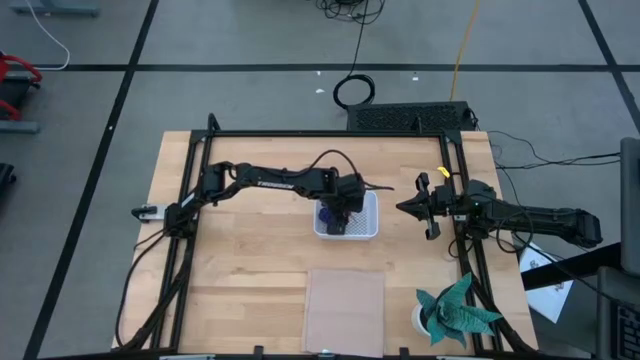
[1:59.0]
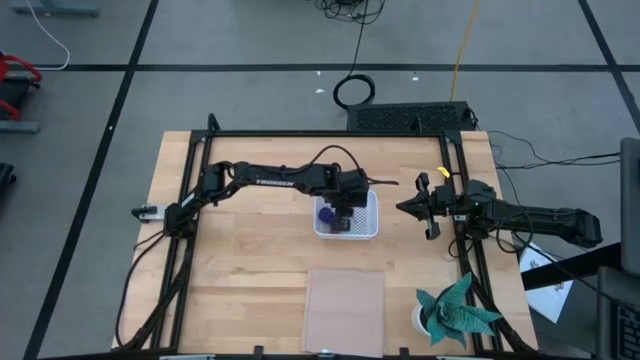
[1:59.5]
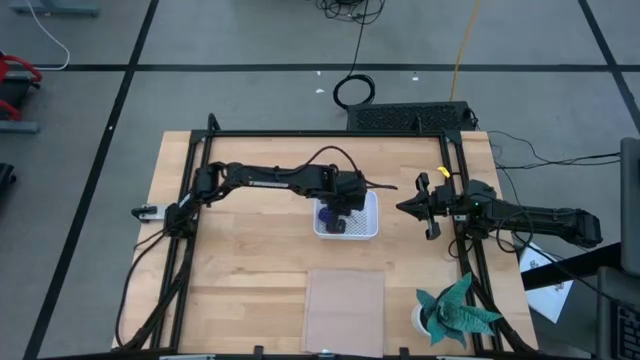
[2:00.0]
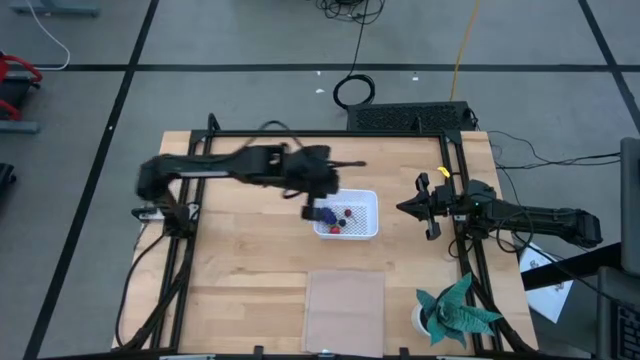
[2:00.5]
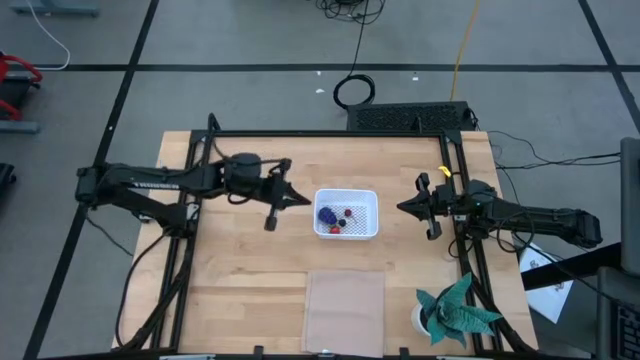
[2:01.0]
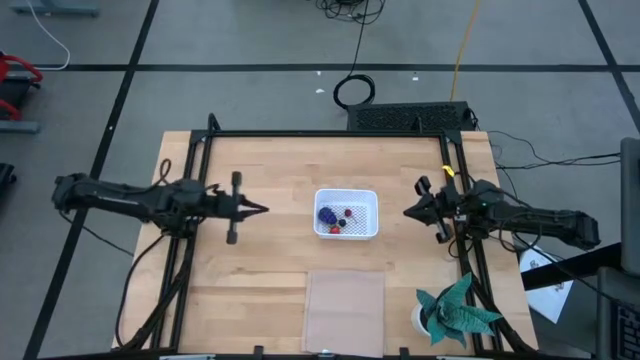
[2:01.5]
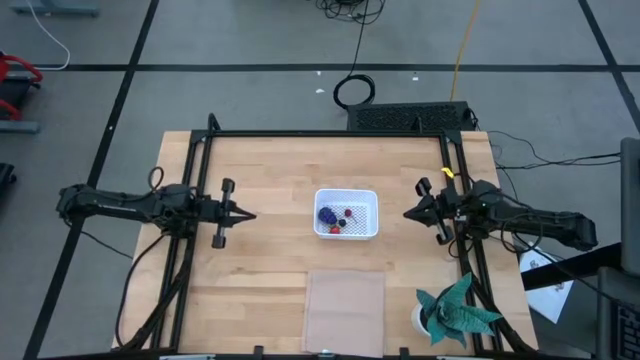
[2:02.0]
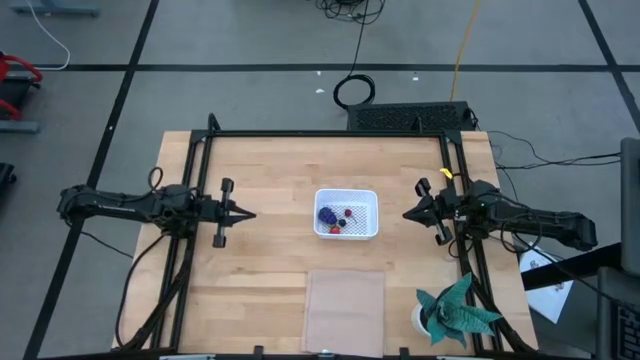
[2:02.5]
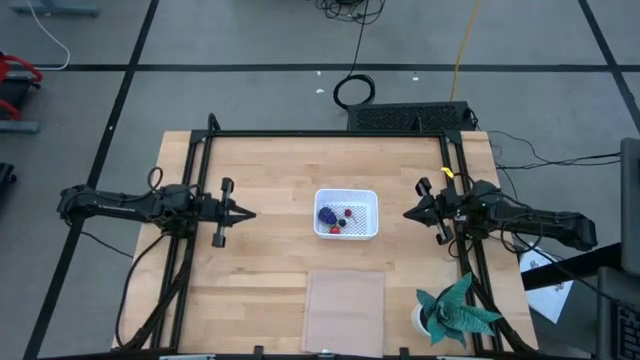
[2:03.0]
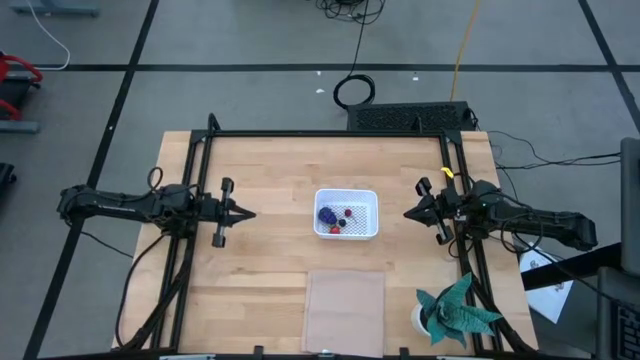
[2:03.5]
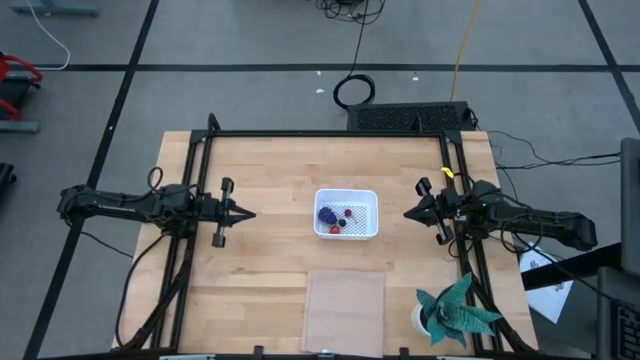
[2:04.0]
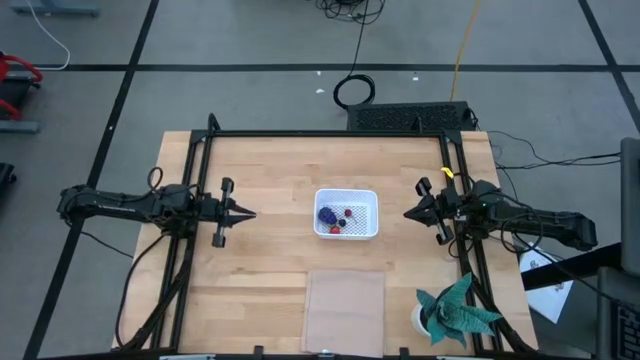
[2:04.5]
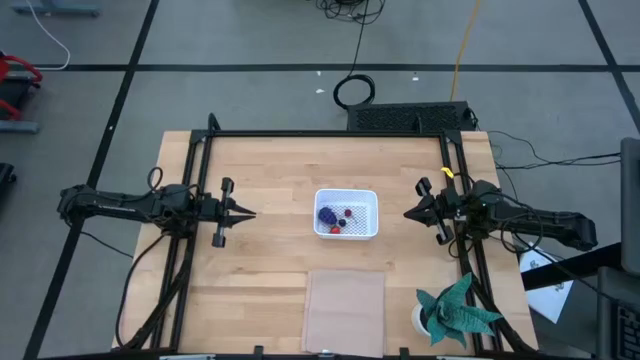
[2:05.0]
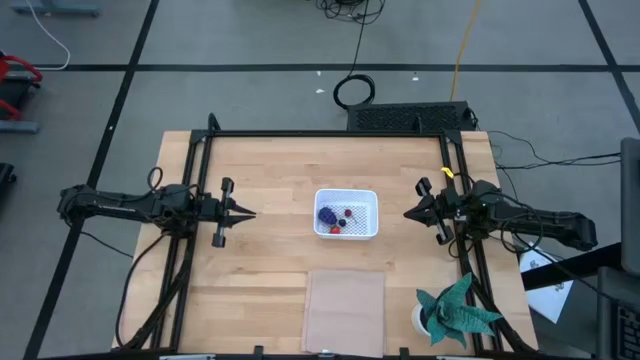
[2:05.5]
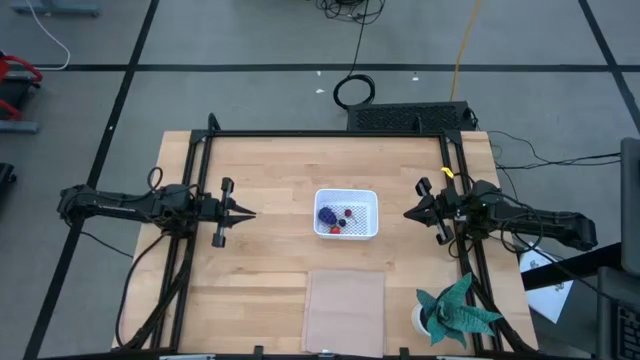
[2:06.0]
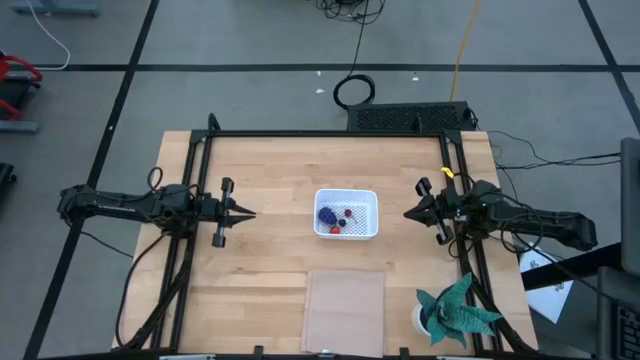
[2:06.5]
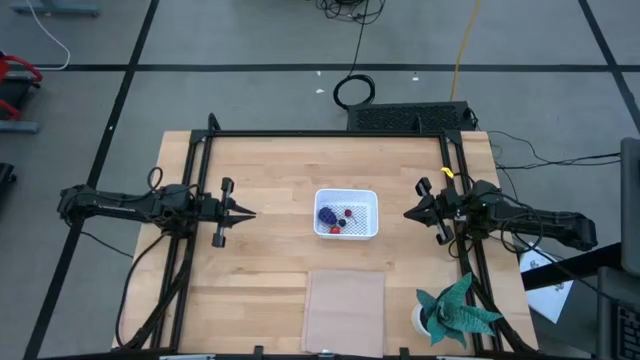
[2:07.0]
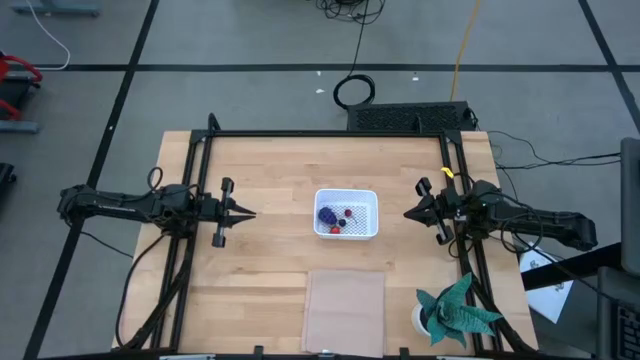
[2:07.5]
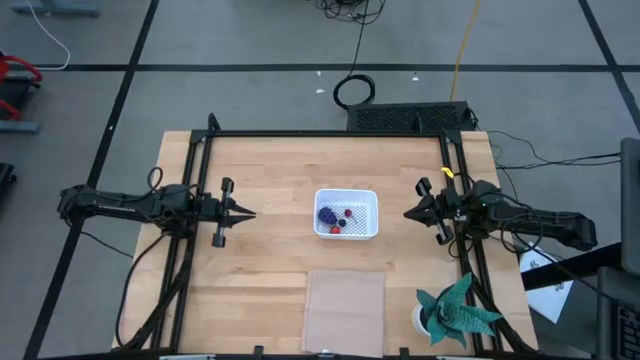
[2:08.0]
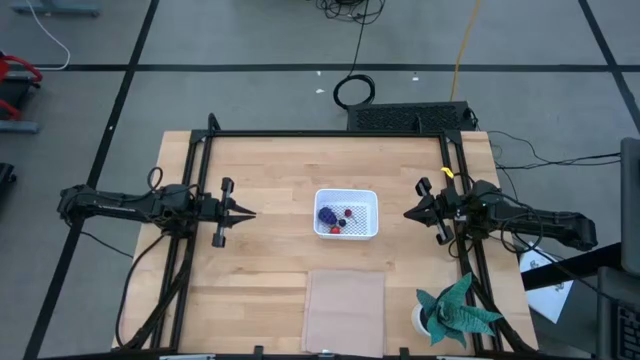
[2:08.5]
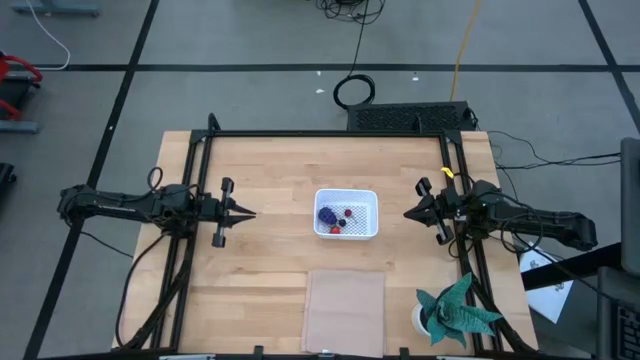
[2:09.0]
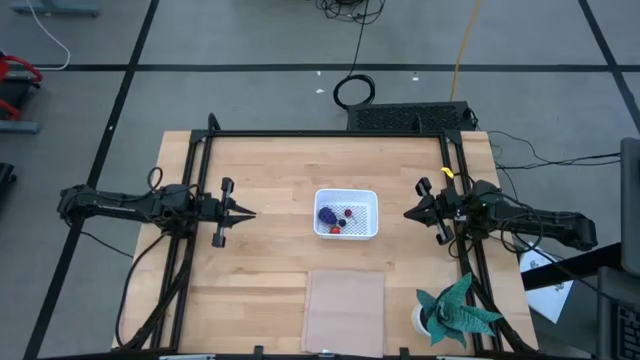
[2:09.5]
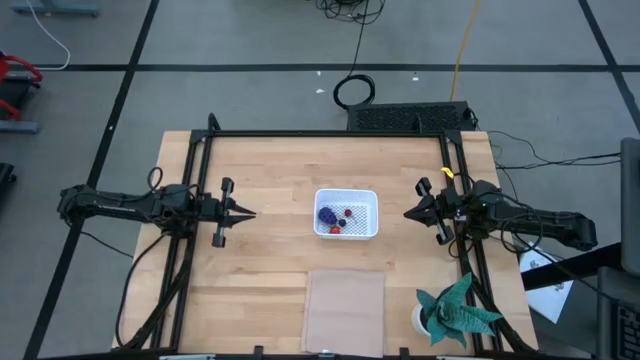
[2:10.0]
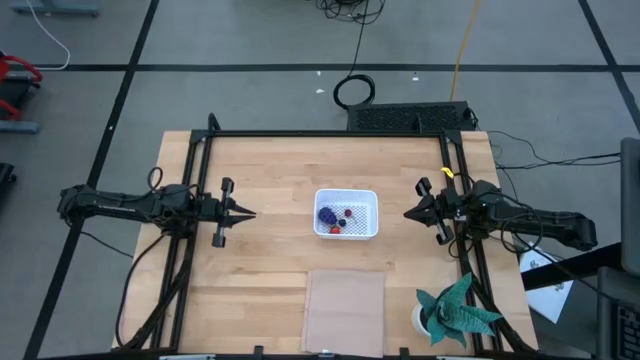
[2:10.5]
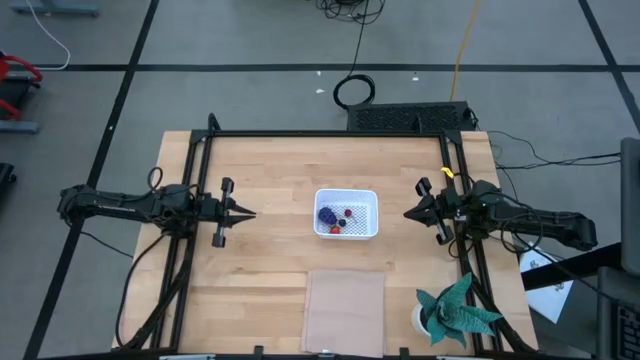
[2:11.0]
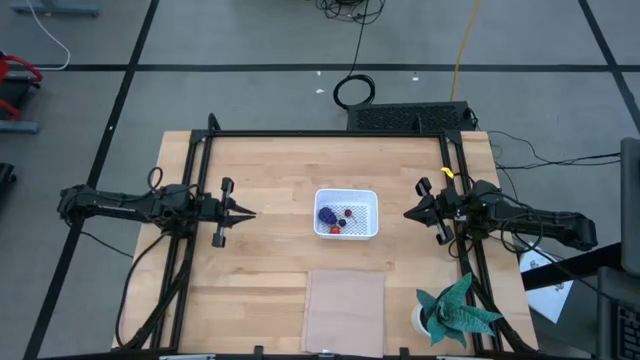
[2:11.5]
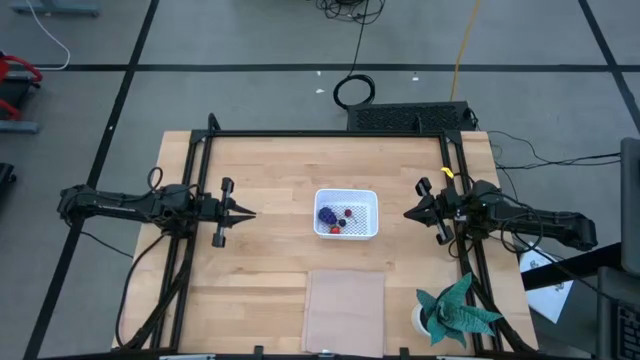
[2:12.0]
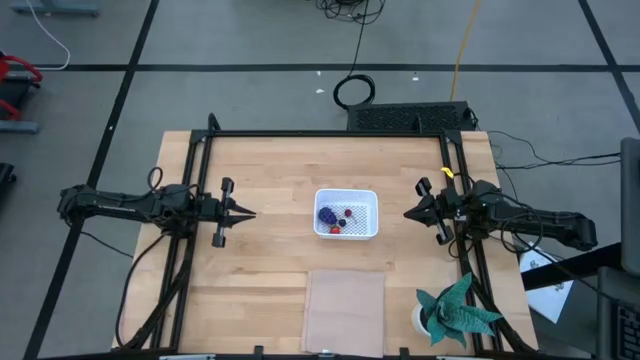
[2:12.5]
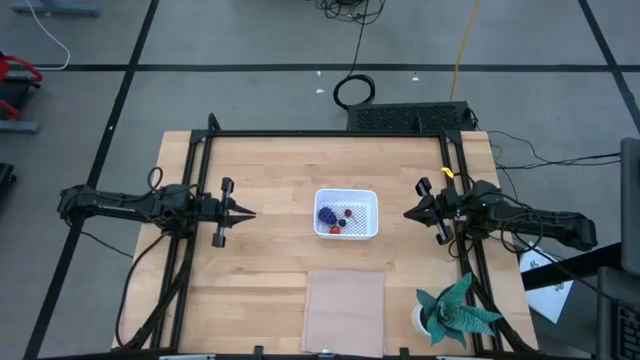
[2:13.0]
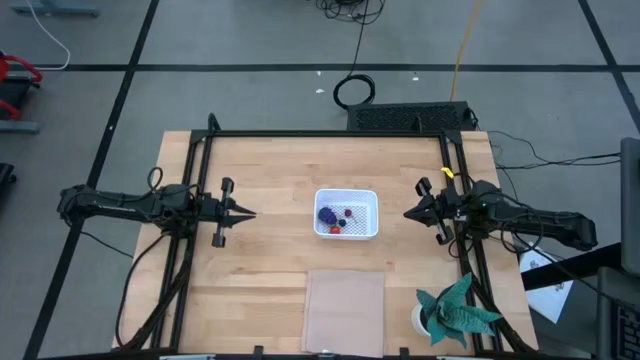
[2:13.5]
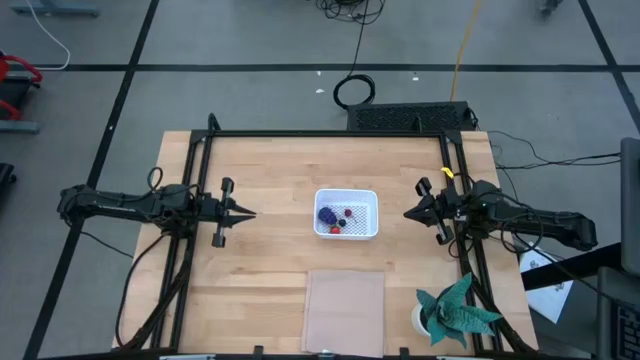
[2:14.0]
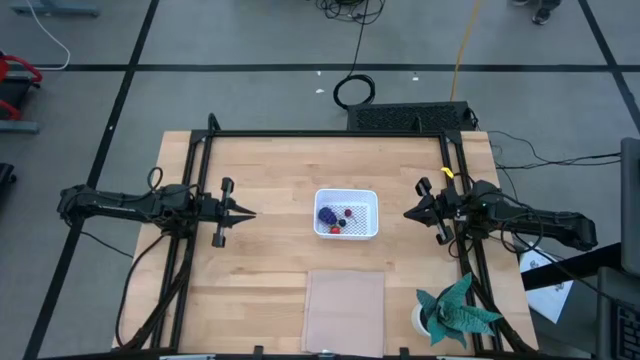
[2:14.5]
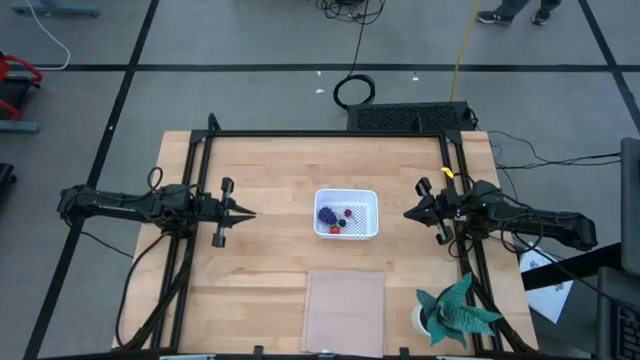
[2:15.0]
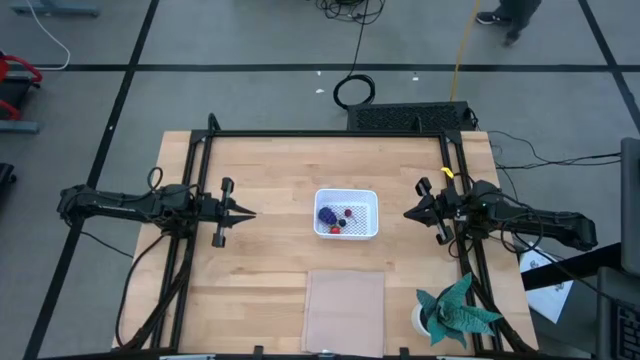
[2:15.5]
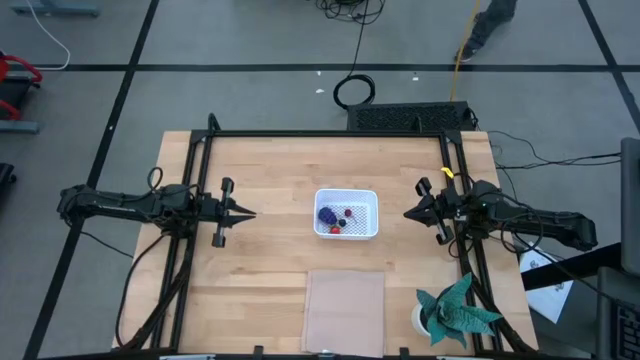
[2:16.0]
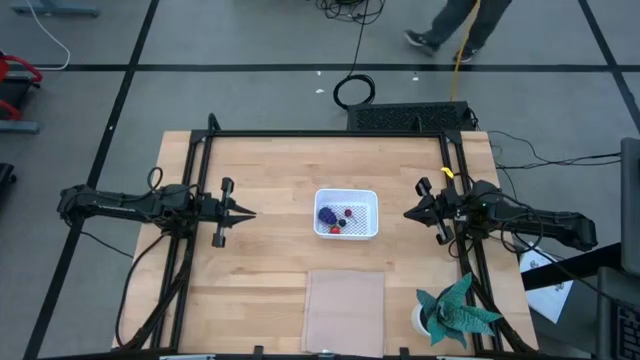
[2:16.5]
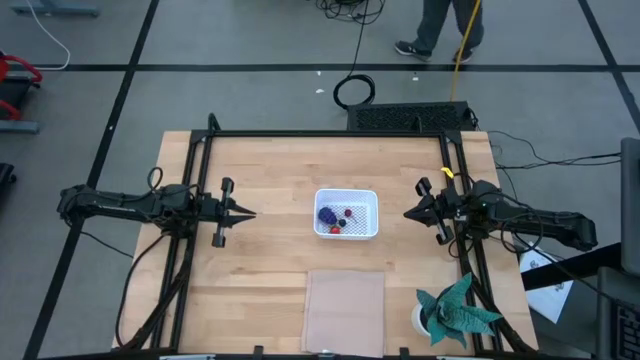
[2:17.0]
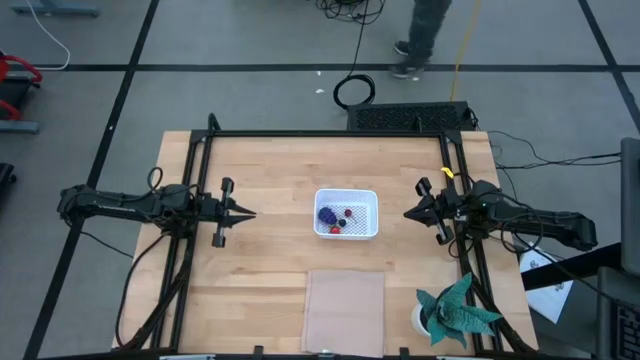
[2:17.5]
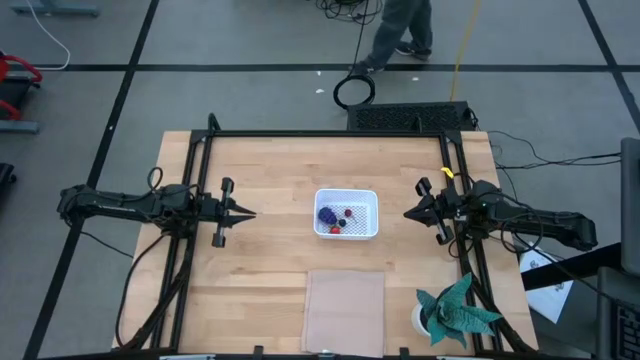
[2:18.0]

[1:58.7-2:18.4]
Task: Pick and placing Produce into tupperware
Return to Home Position

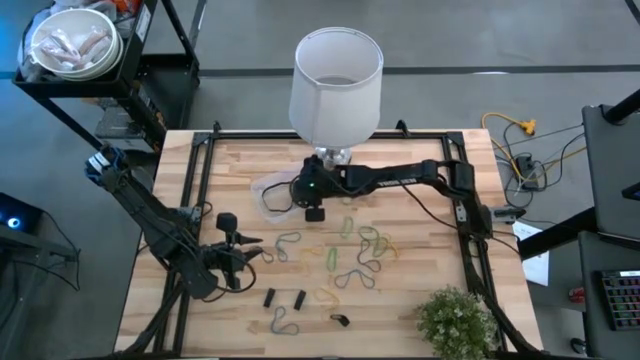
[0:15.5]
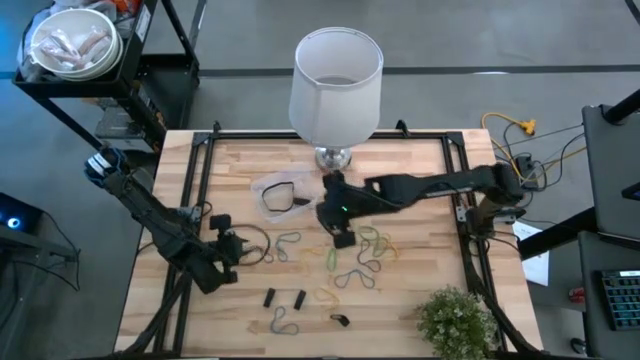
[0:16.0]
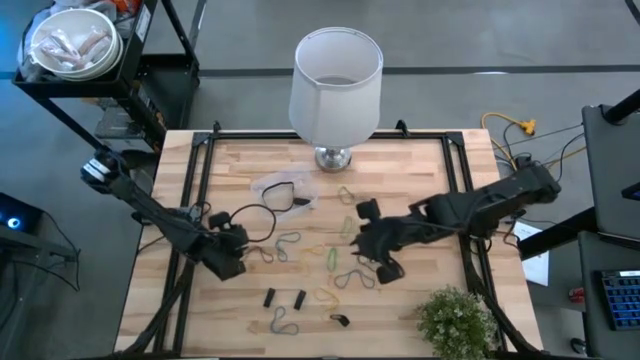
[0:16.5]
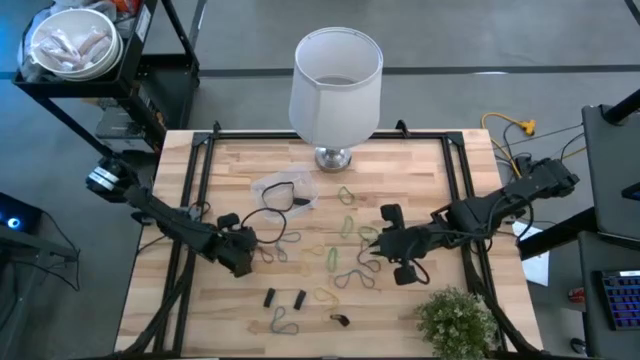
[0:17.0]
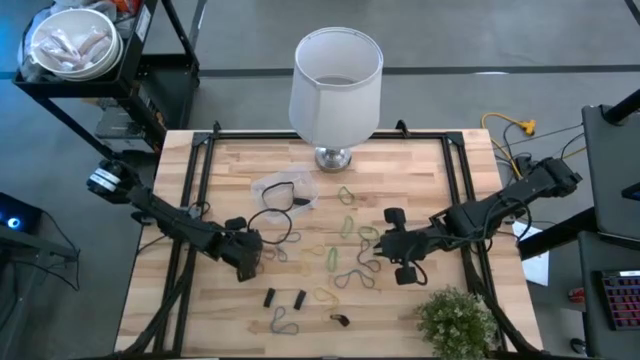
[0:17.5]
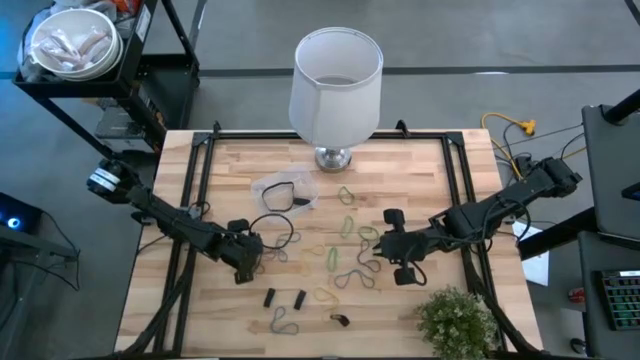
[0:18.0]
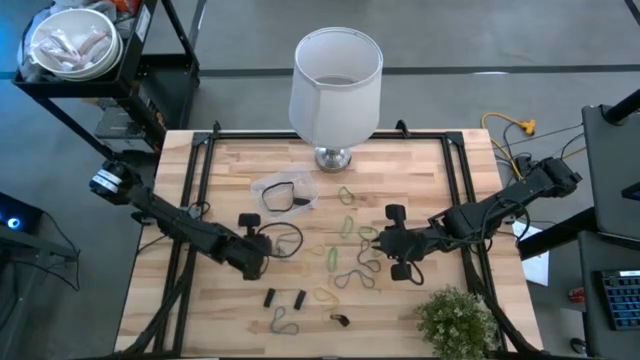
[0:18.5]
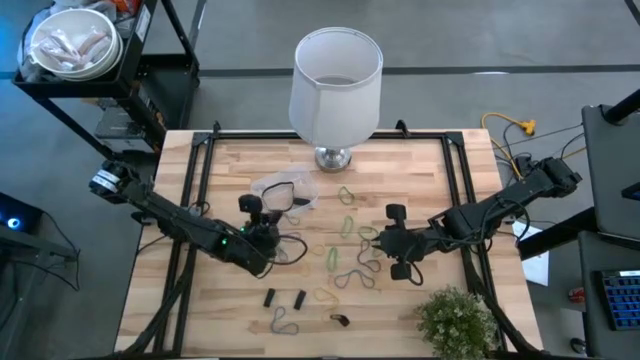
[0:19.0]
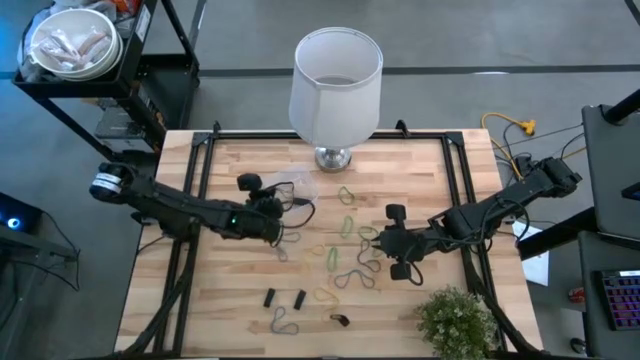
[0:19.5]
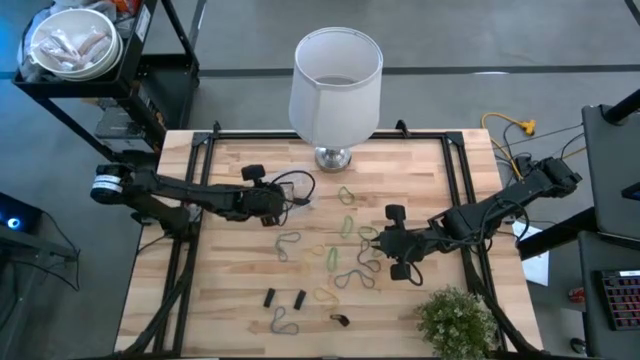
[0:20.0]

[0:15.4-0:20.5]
Task: Pick and place rubber bands into bin
Put the purple rubber band into the transparent bin
